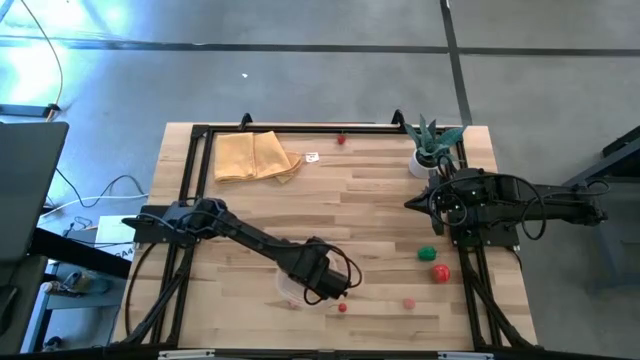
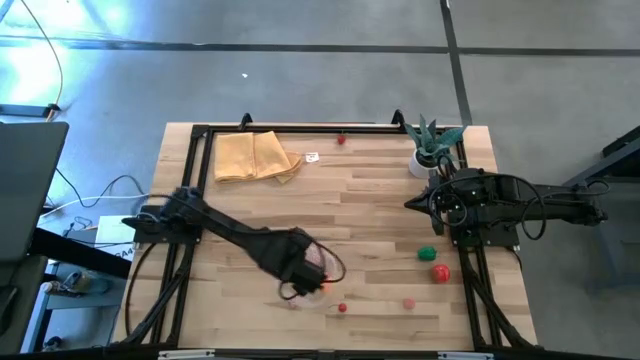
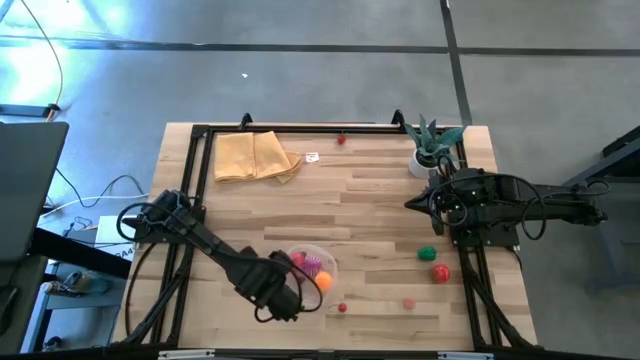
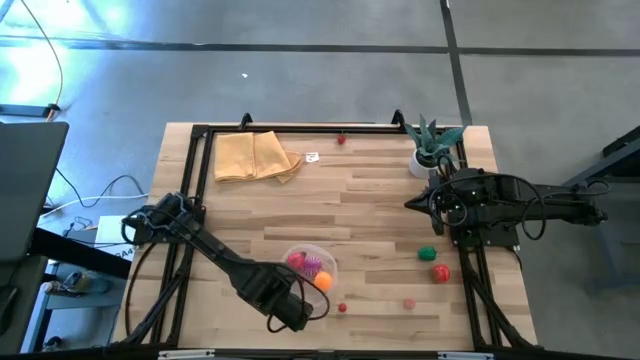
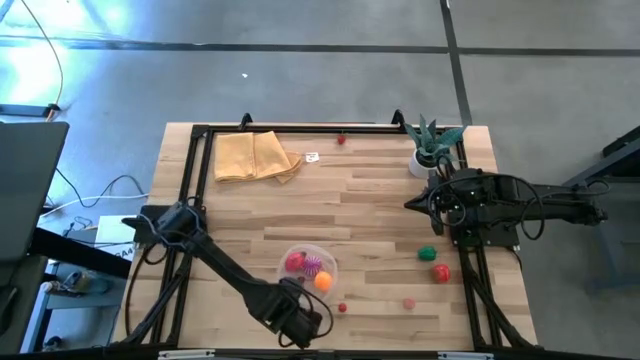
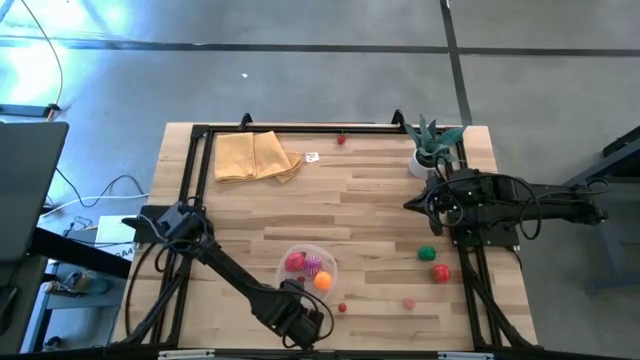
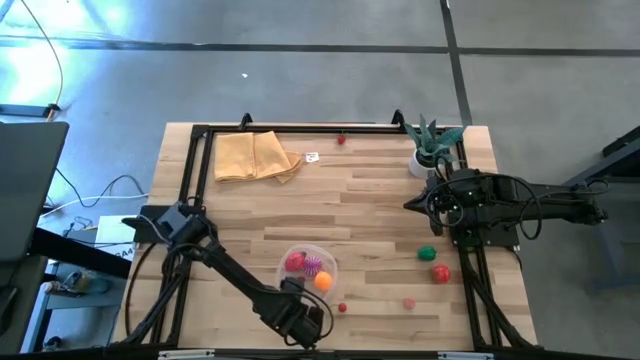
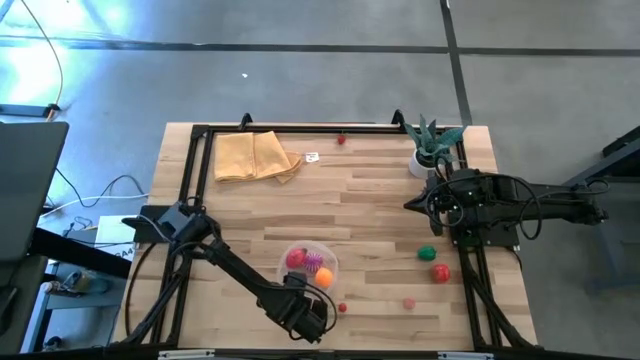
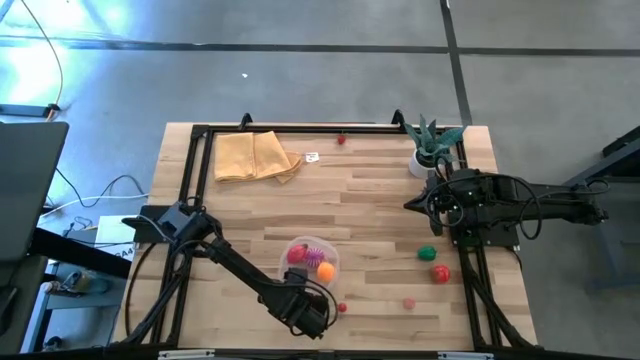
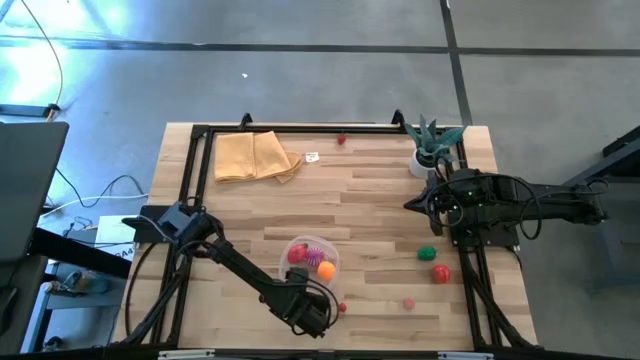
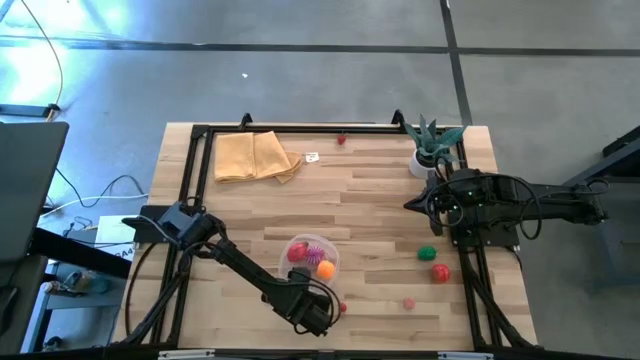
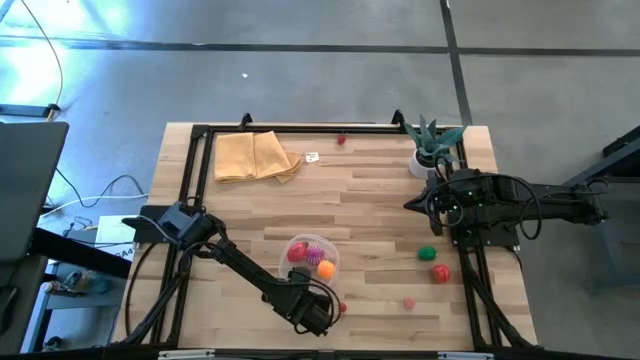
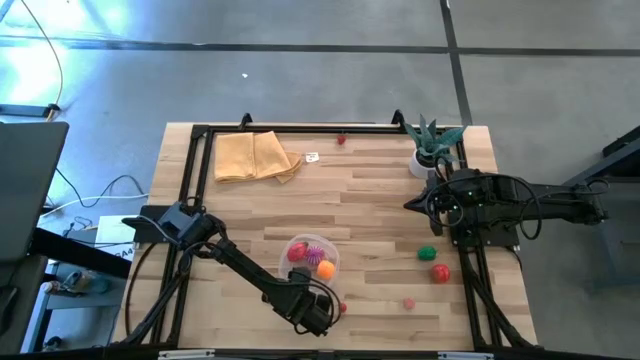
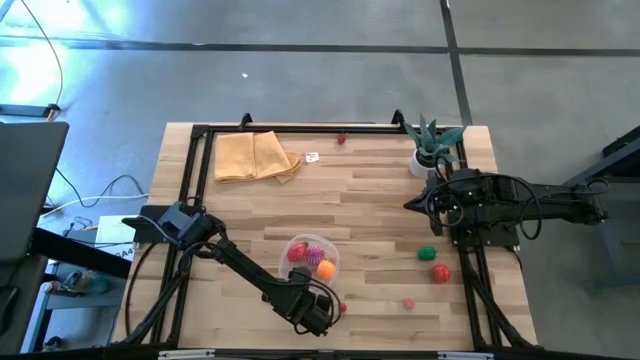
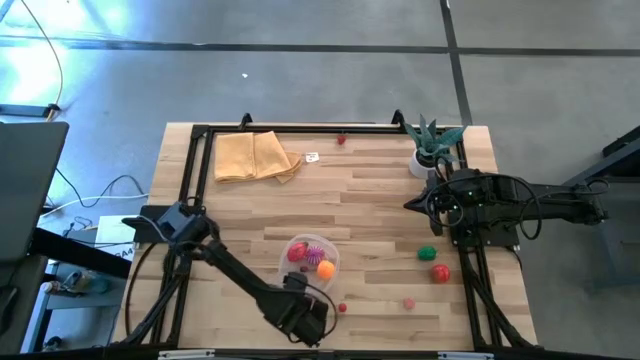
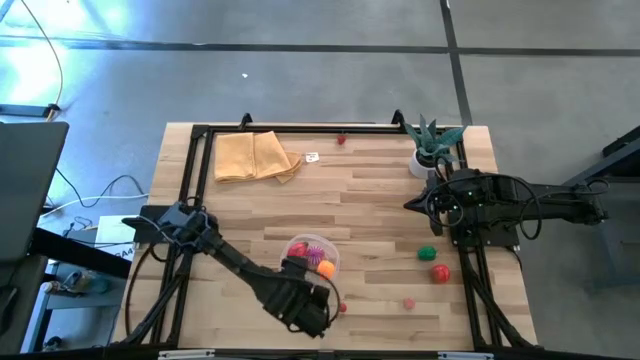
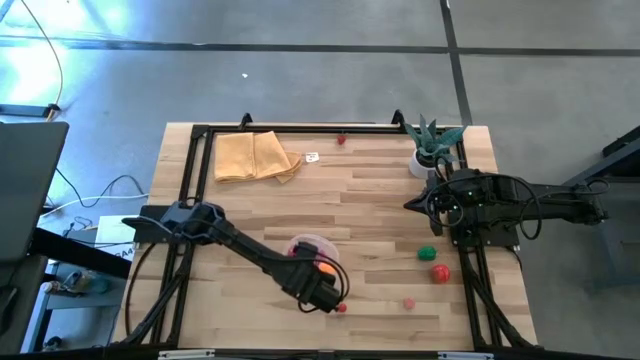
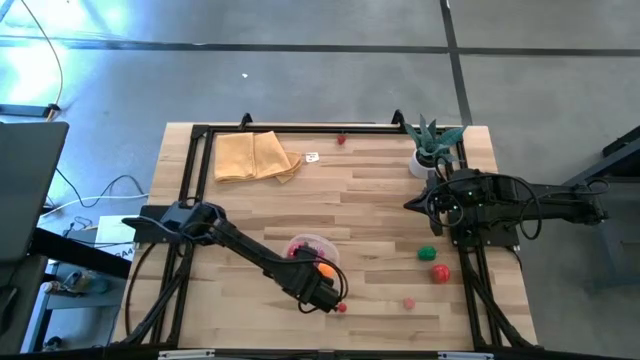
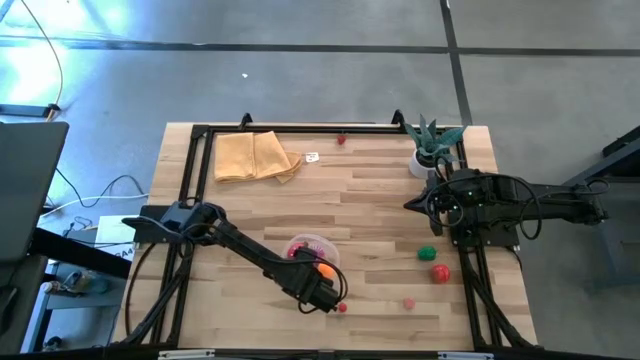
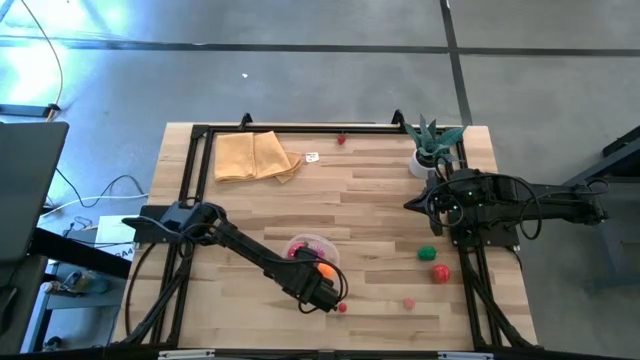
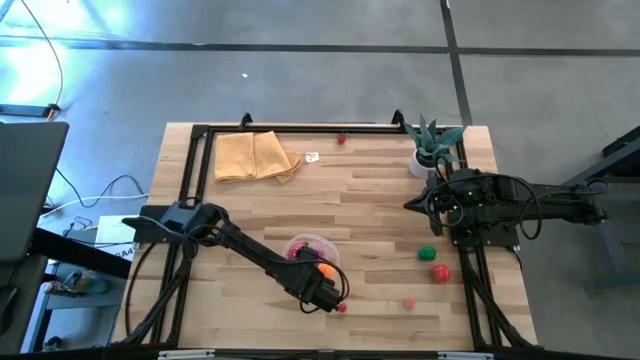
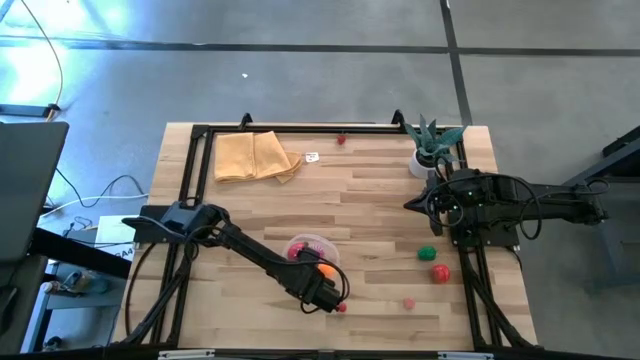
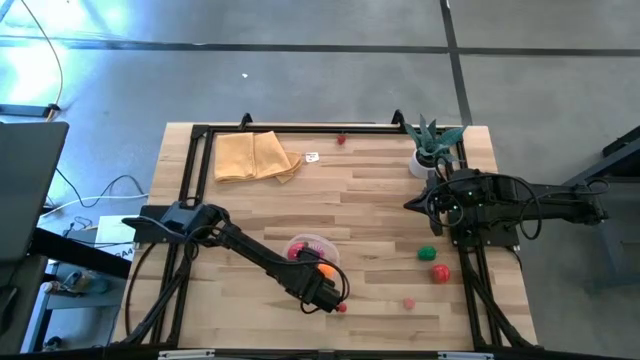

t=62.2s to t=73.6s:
Task: Pick and placing Produce into tupperware
Put the left peach into the bin

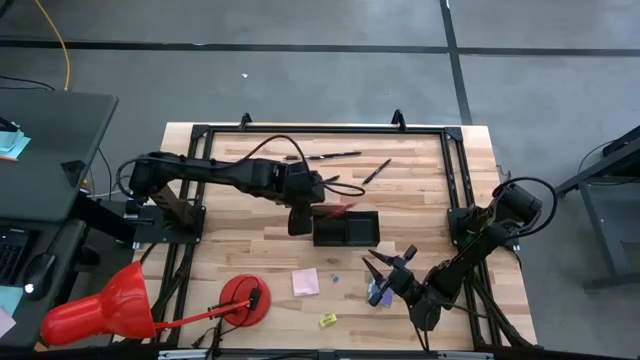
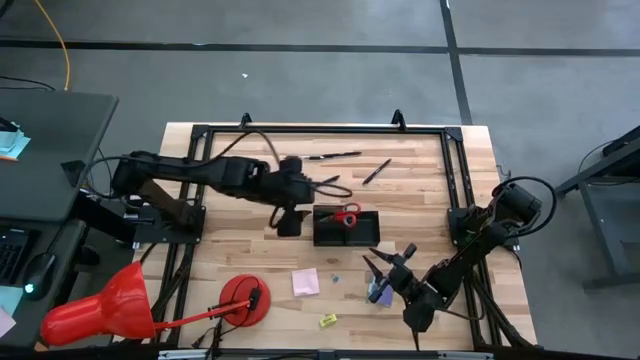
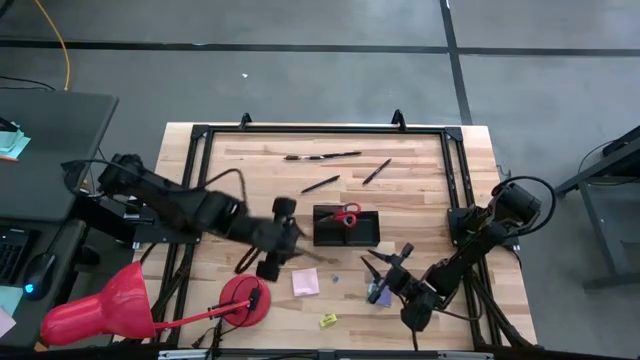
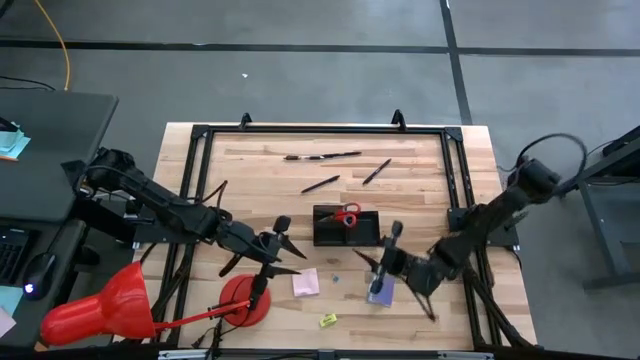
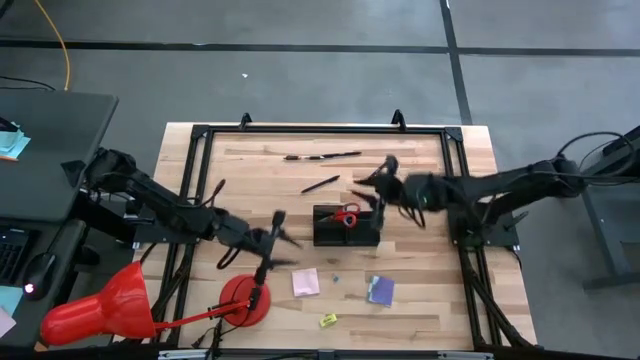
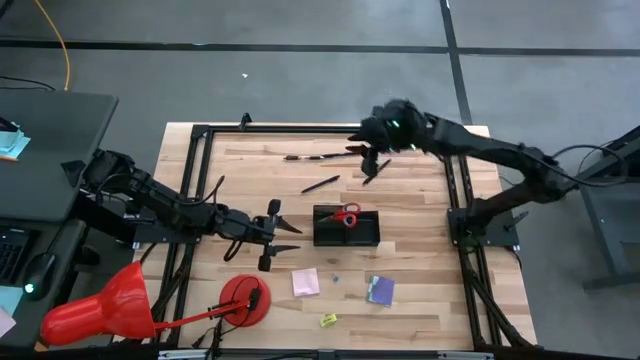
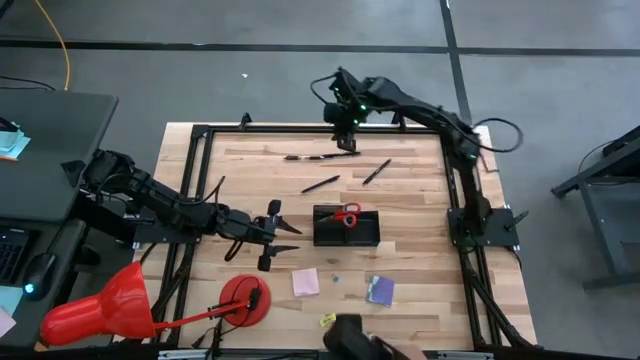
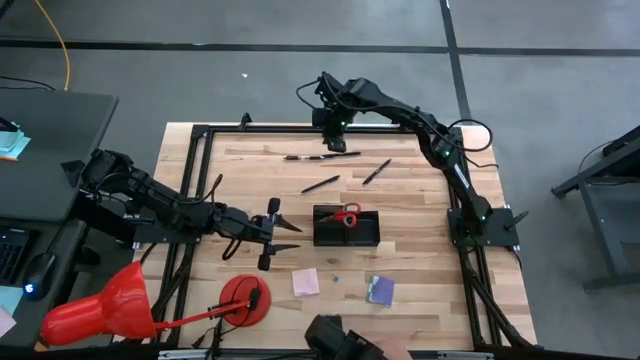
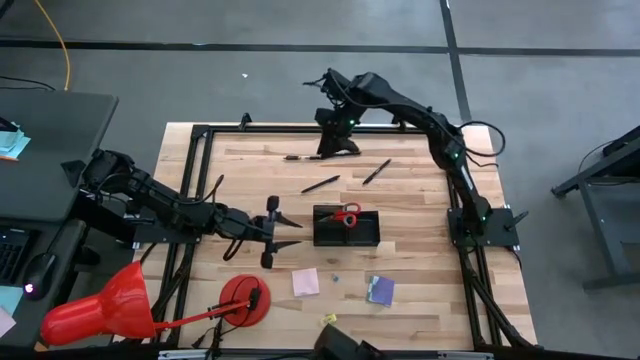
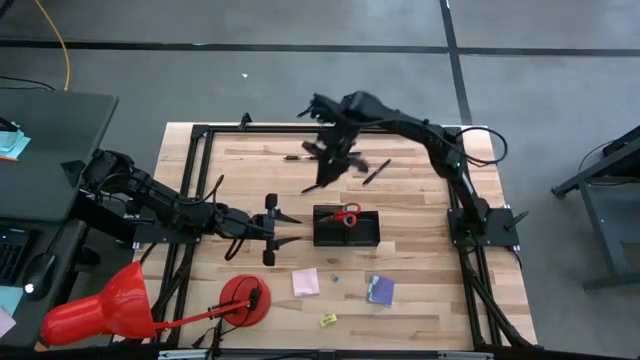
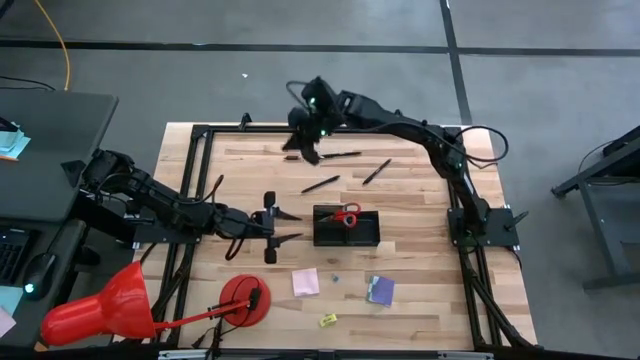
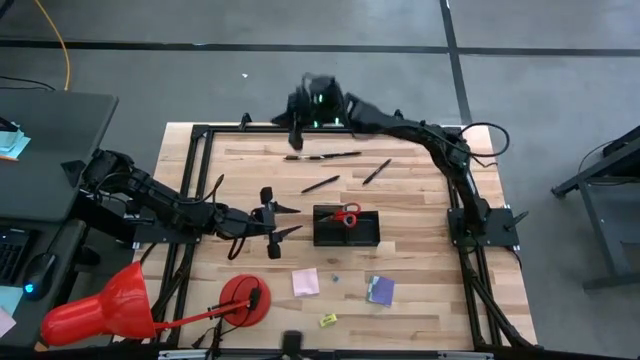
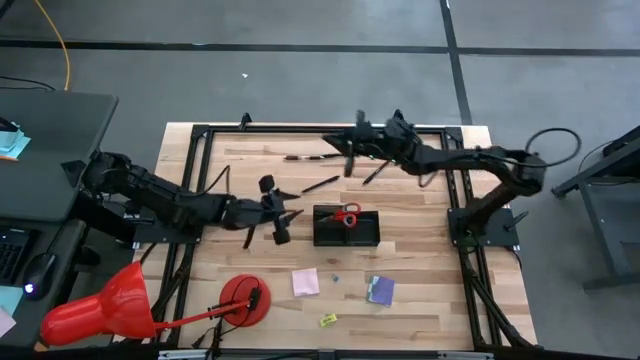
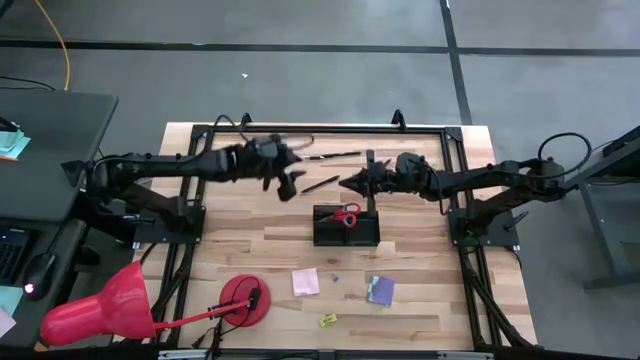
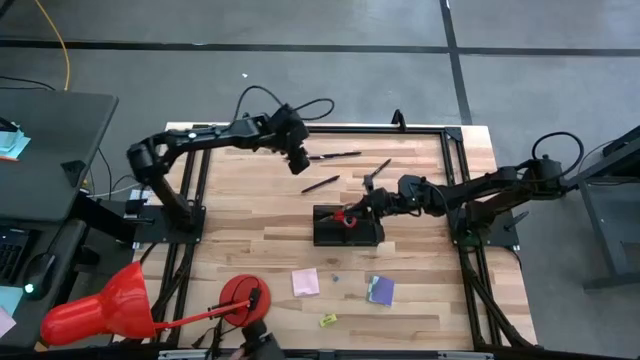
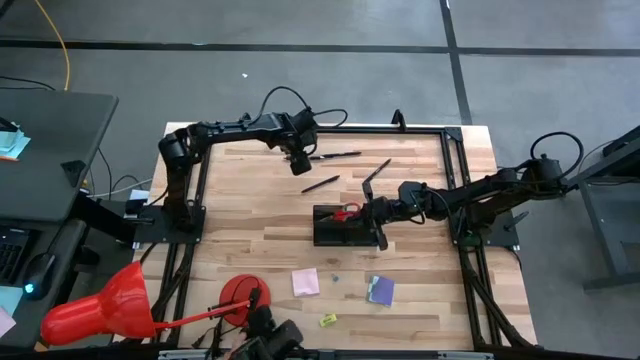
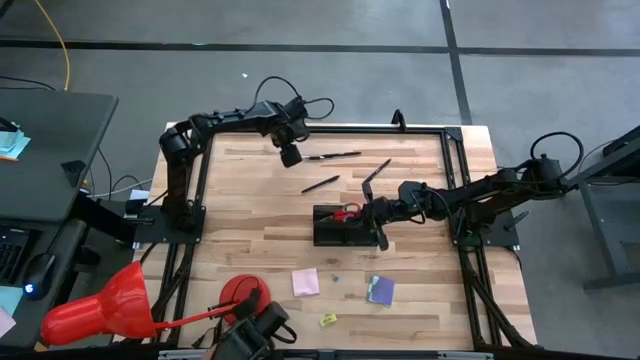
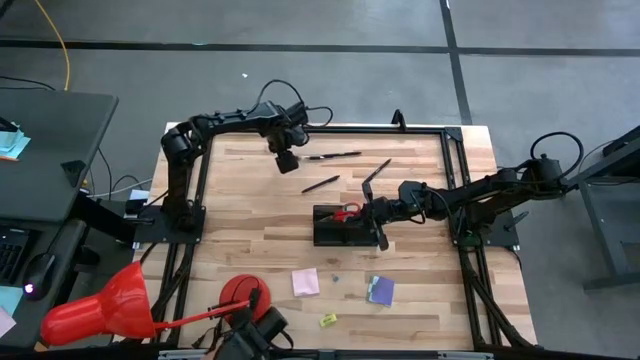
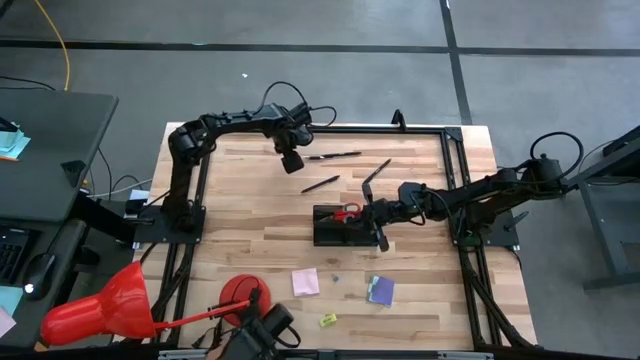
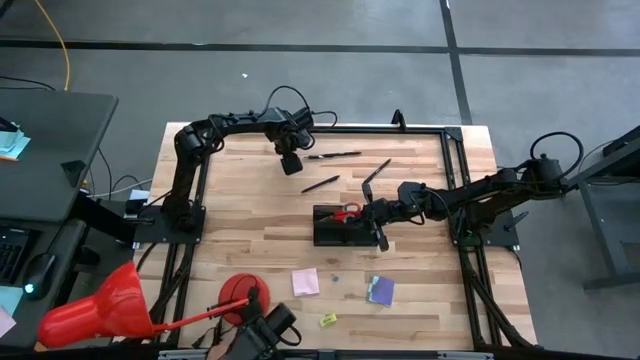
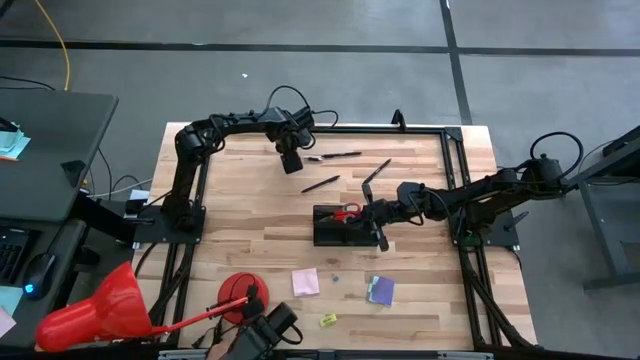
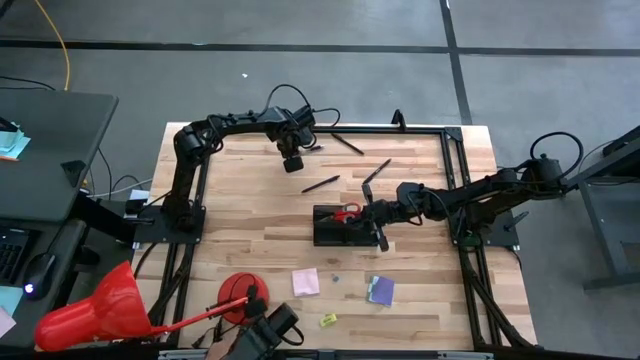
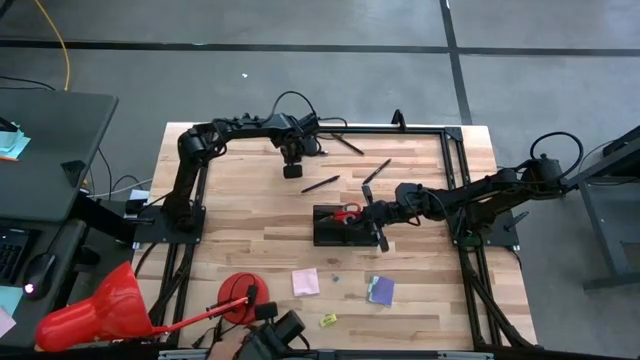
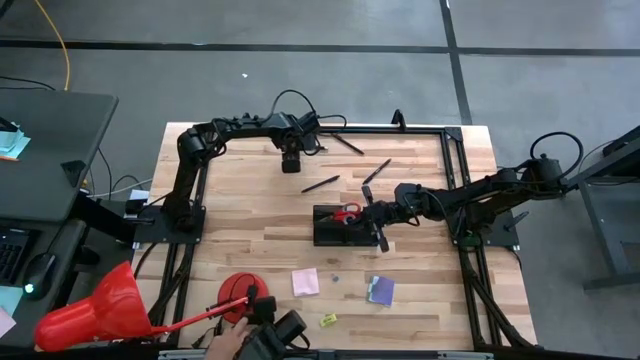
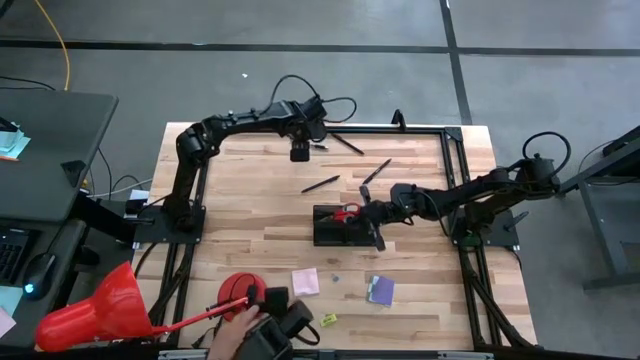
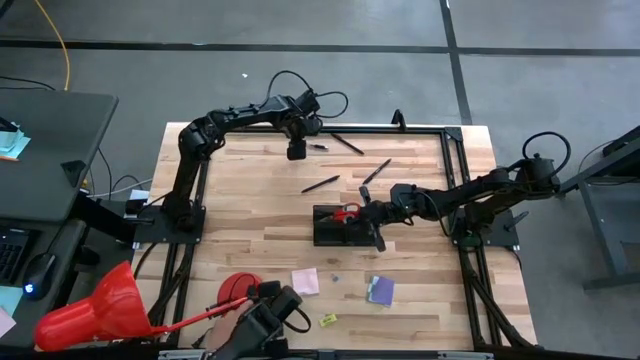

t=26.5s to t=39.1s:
Task: Pick and place office supplies into organizer
Put the black pen into the black desk organizer
